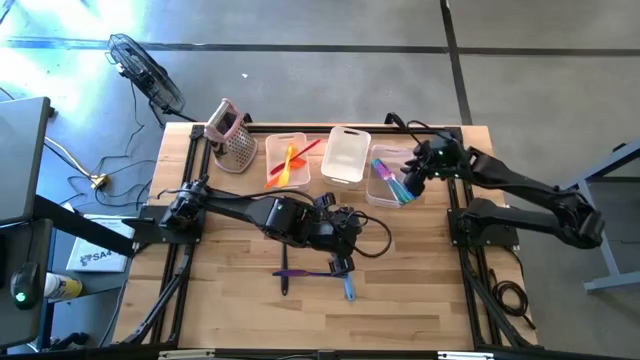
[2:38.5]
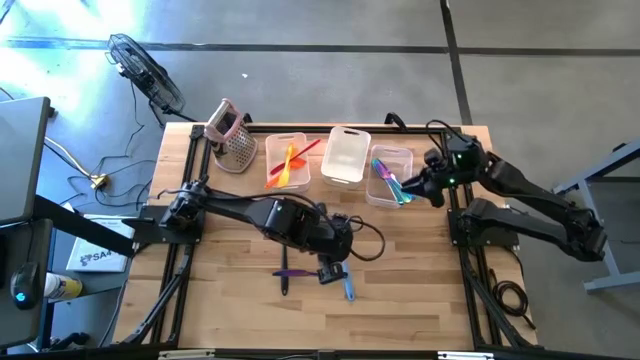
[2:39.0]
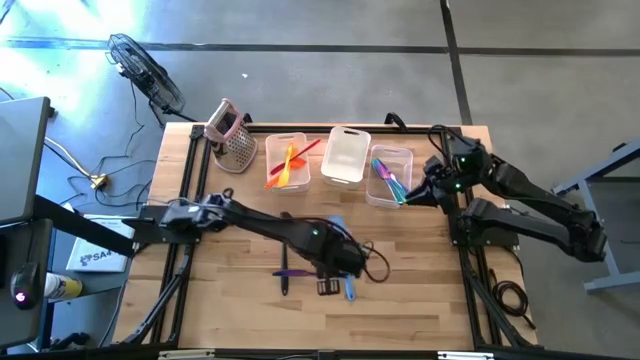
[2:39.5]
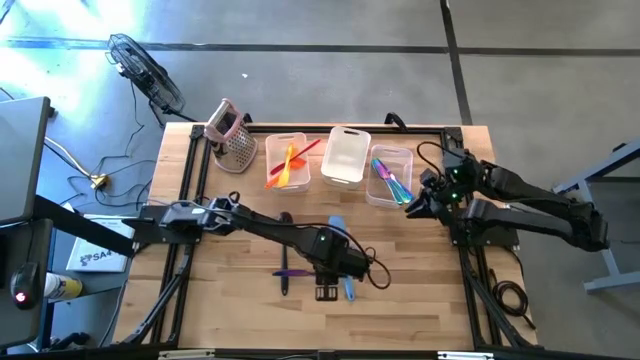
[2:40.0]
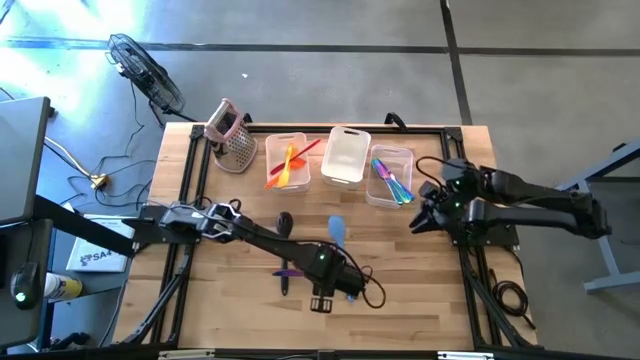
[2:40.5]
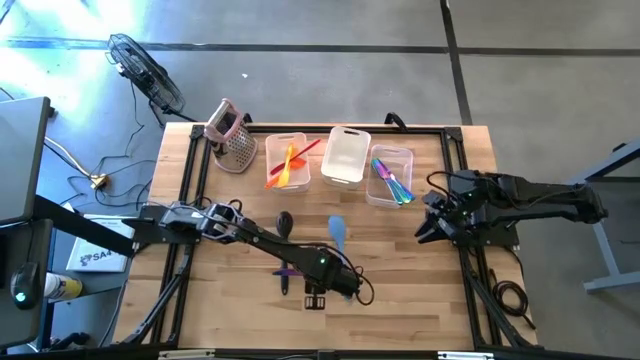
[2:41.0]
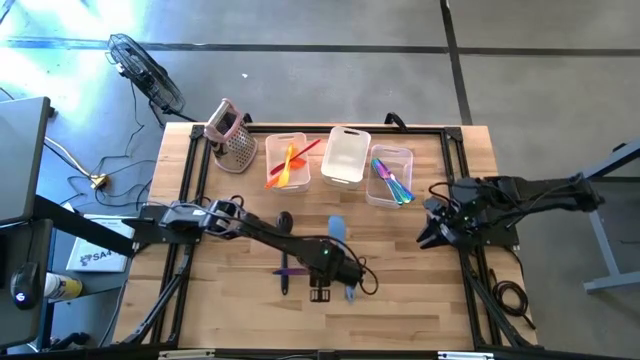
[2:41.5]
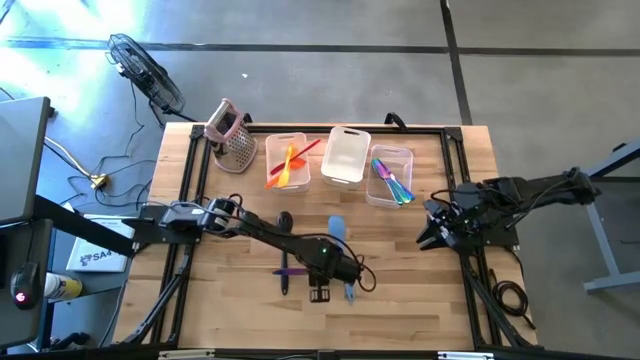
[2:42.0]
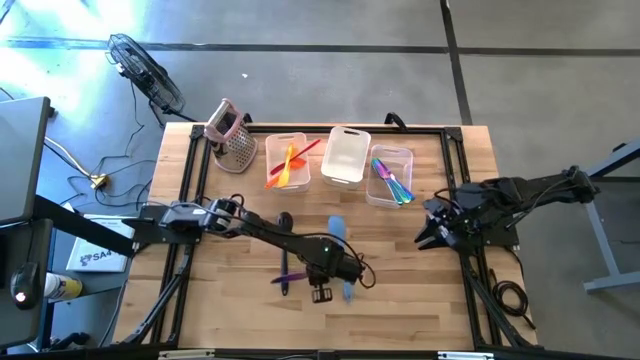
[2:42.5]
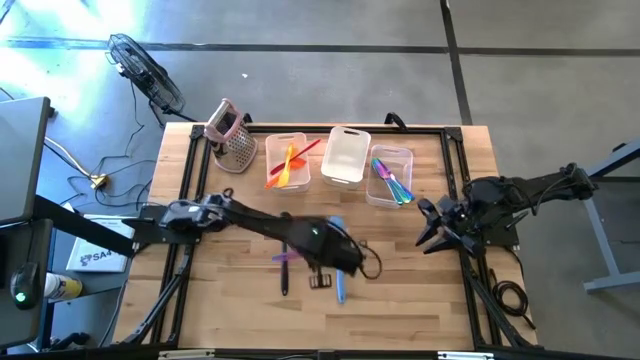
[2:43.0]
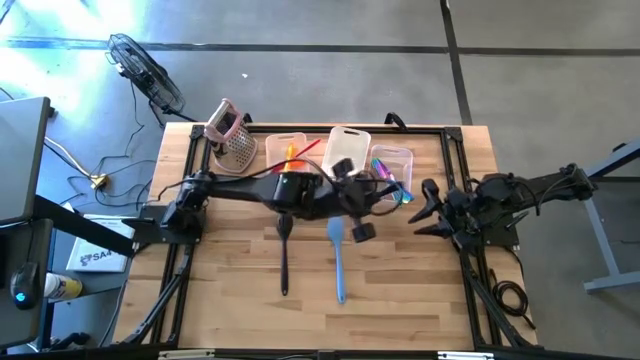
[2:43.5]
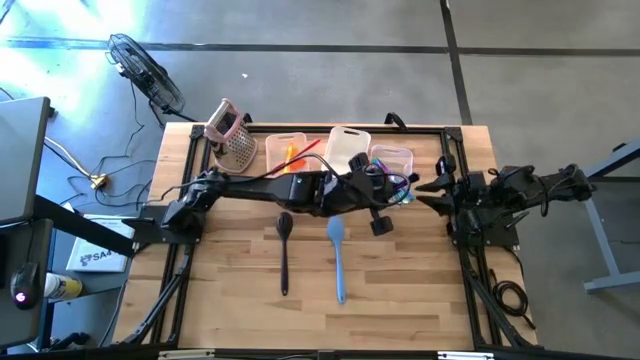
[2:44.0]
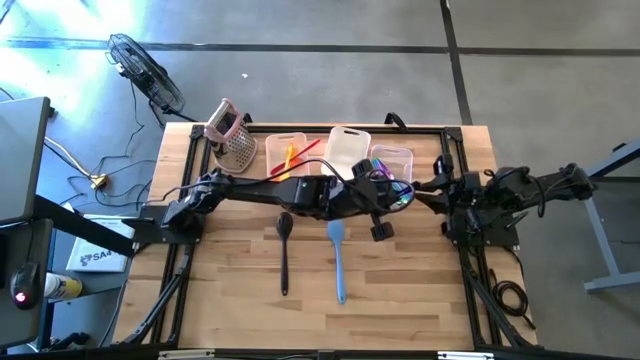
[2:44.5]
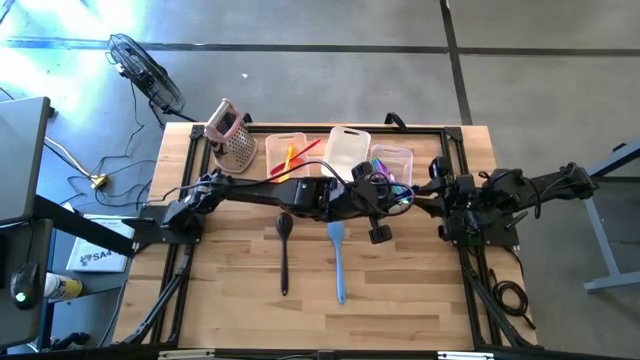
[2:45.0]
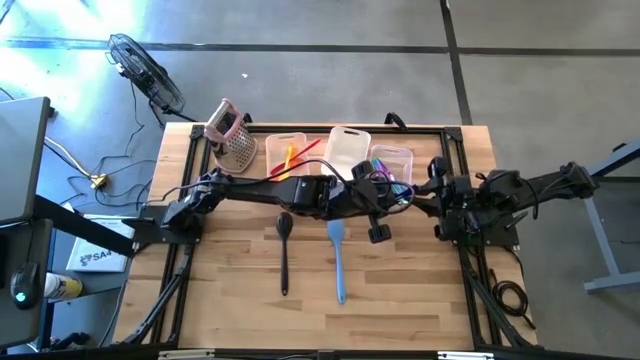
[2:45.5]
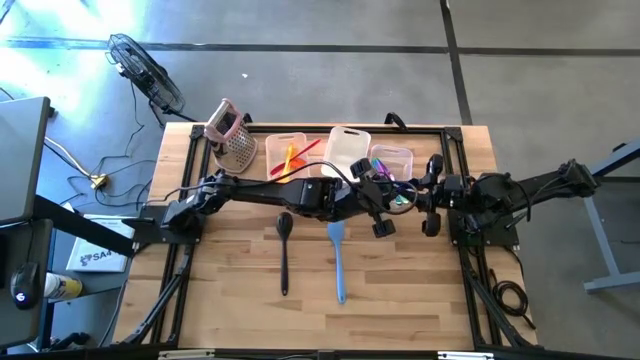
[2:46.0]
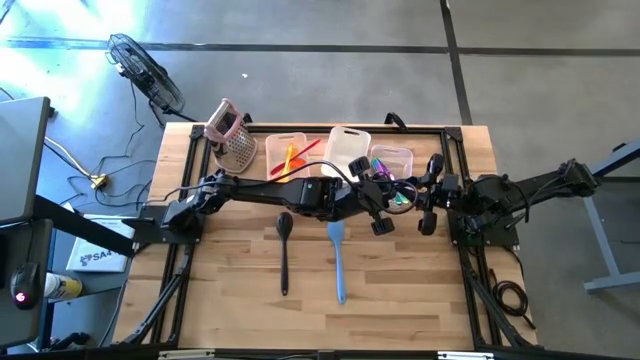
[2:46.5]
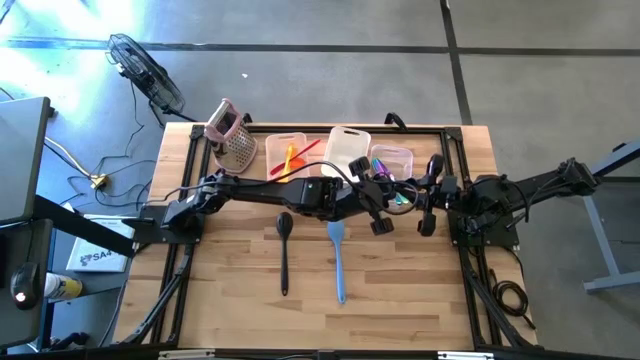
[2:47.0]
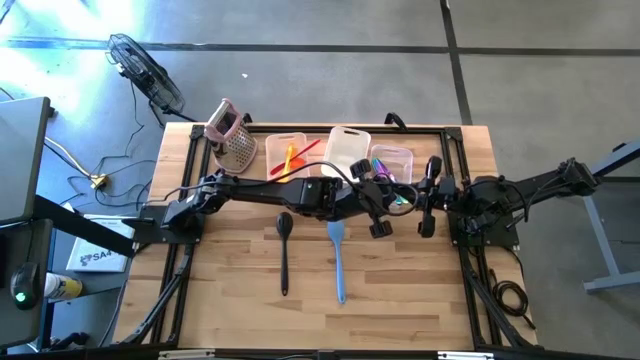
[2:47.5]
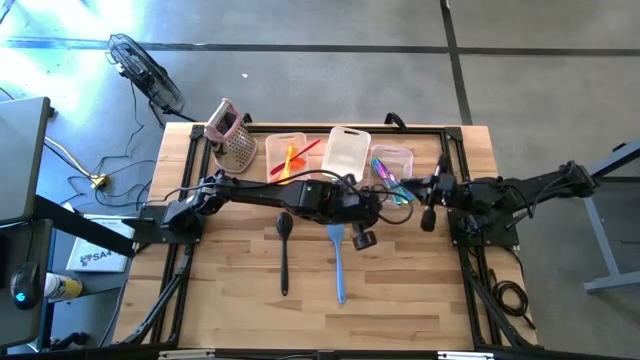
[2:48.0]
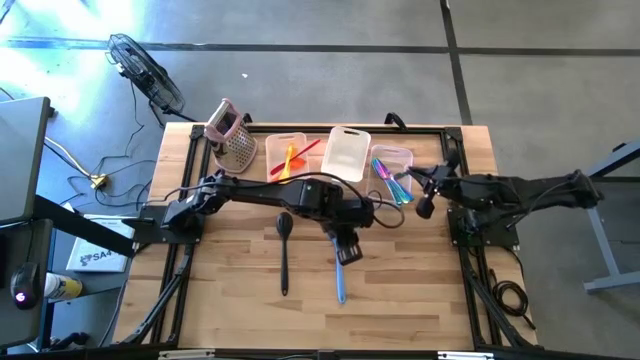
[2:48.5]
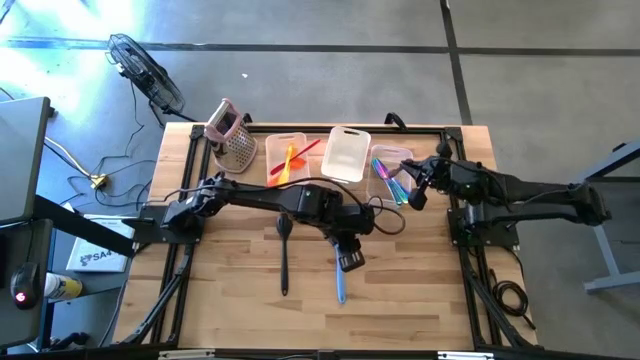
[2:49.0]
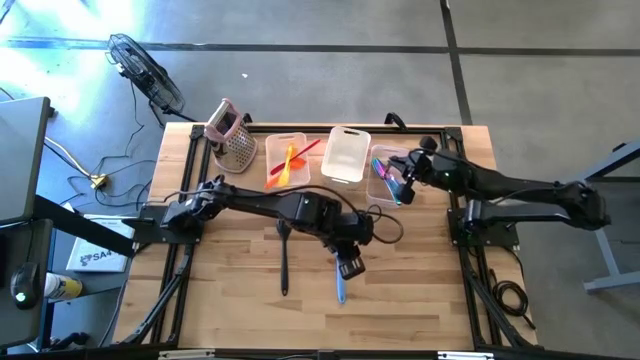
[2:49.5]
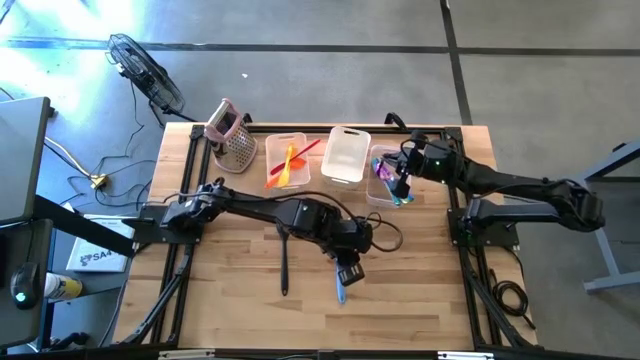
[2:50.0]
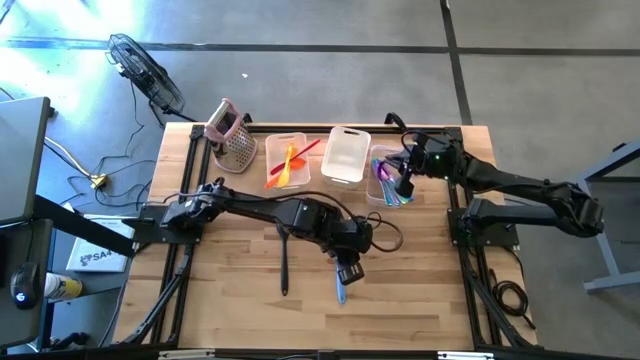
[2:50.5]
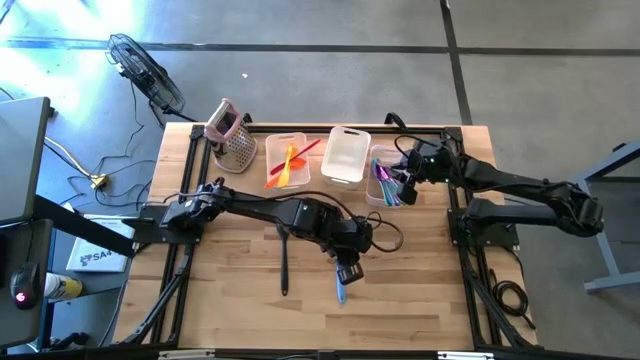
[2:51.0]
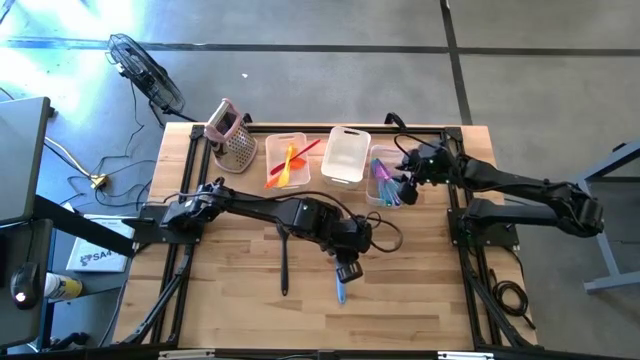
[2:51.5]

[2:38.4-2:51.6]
Task: Pick & Place Kitchen Items
Put the blue table knife into the transparent bin

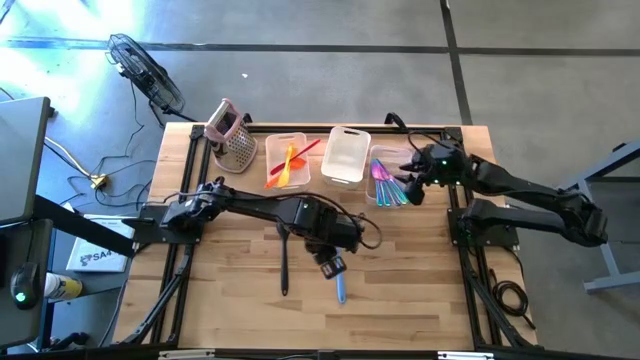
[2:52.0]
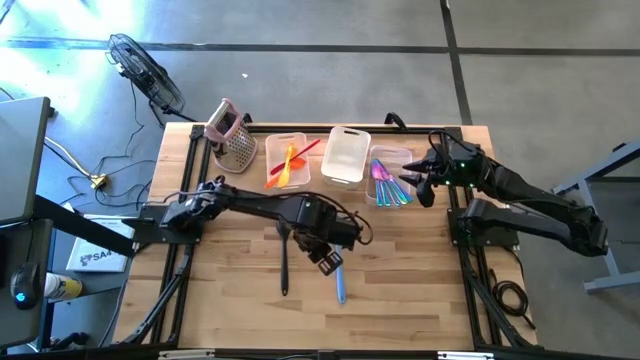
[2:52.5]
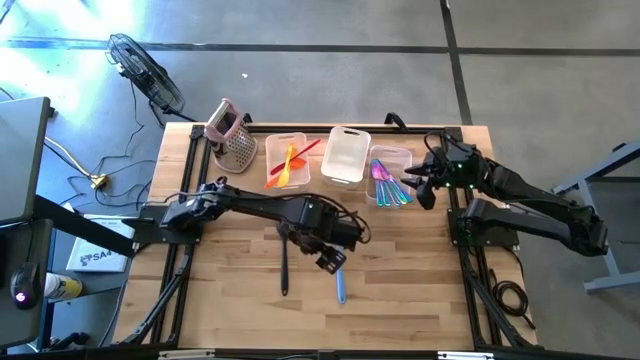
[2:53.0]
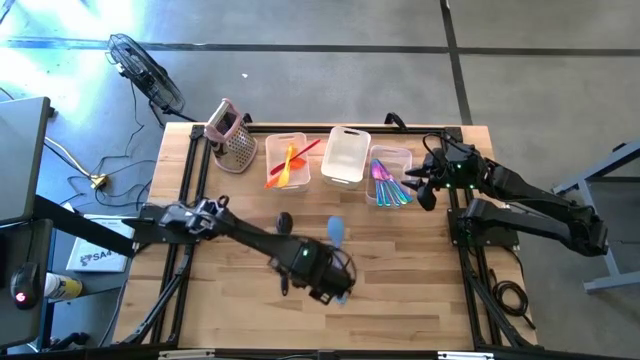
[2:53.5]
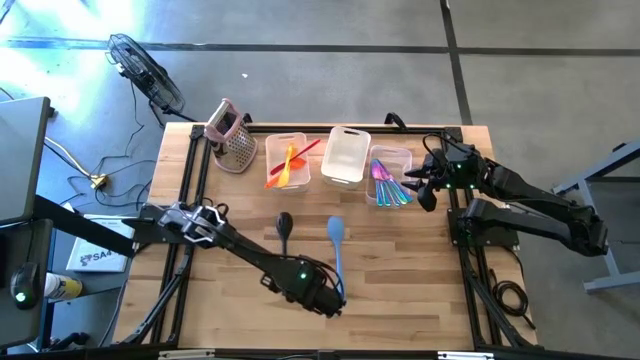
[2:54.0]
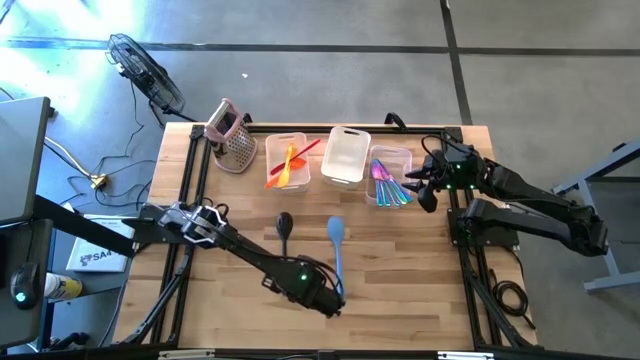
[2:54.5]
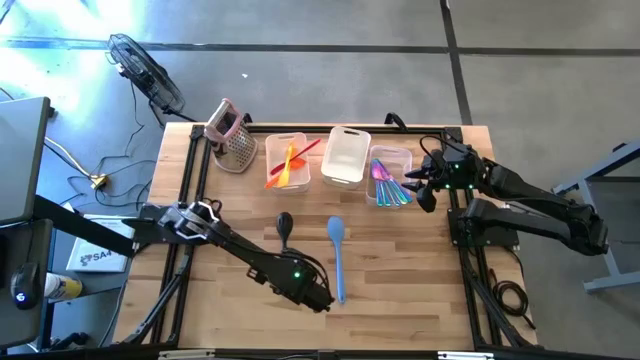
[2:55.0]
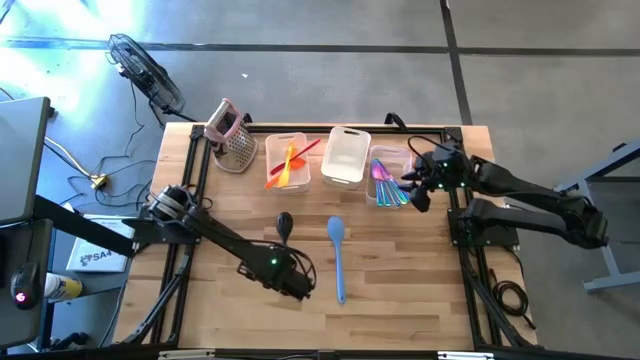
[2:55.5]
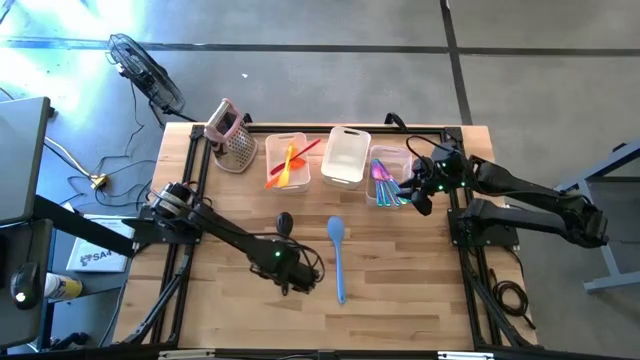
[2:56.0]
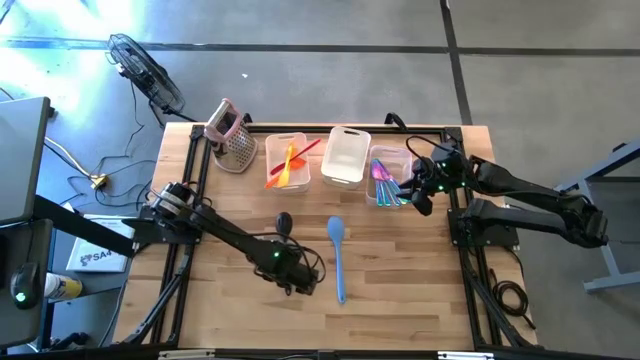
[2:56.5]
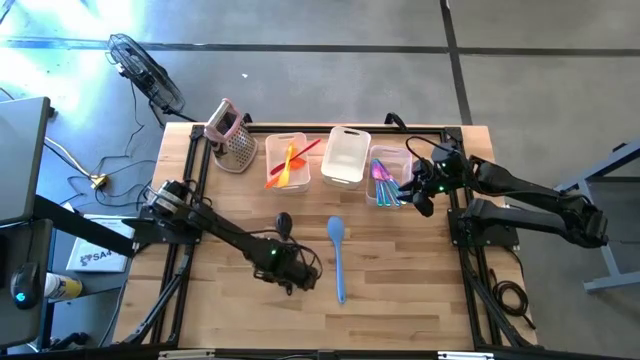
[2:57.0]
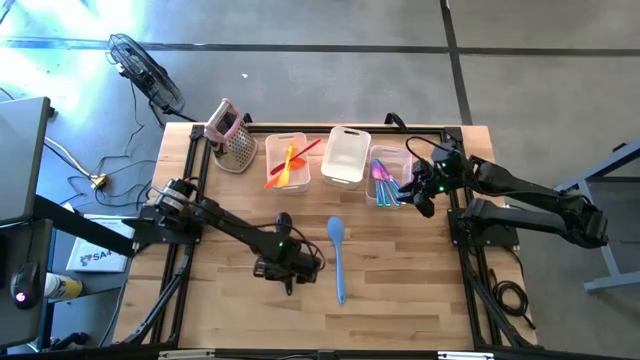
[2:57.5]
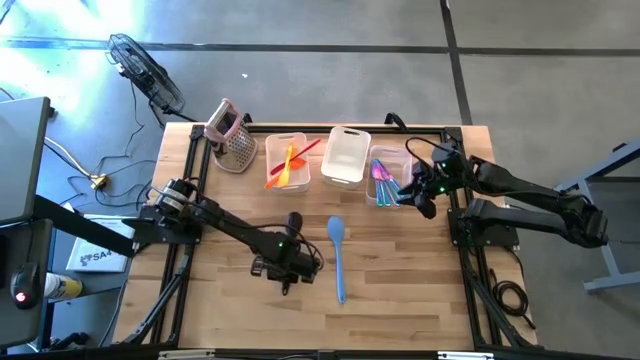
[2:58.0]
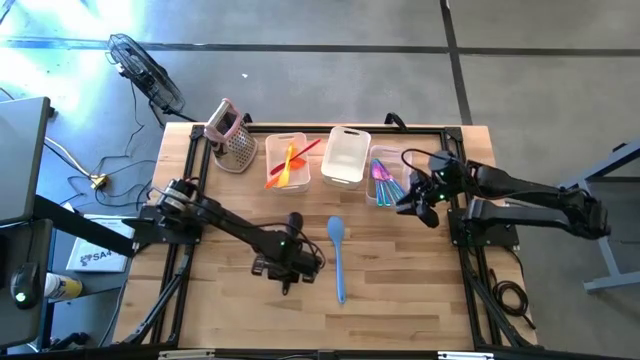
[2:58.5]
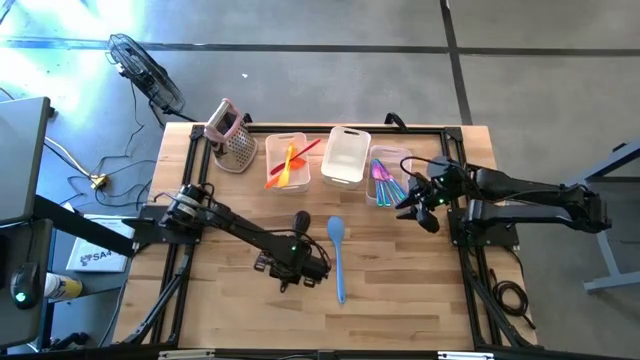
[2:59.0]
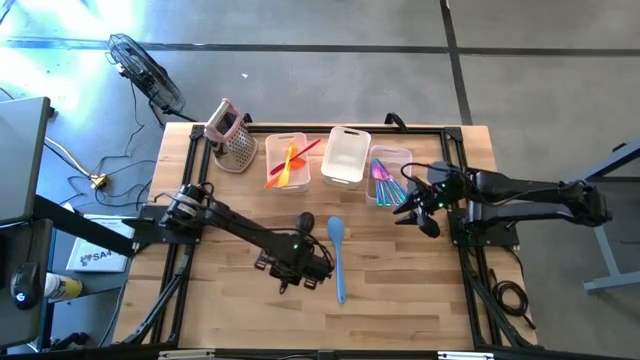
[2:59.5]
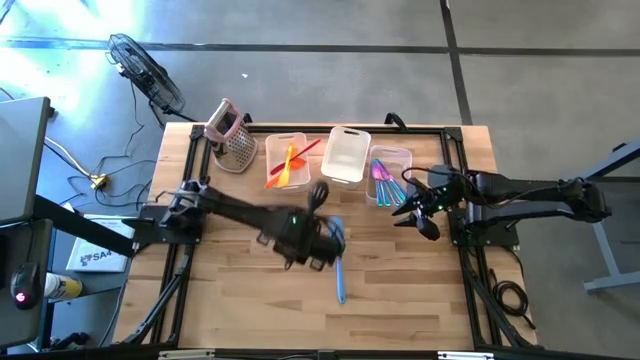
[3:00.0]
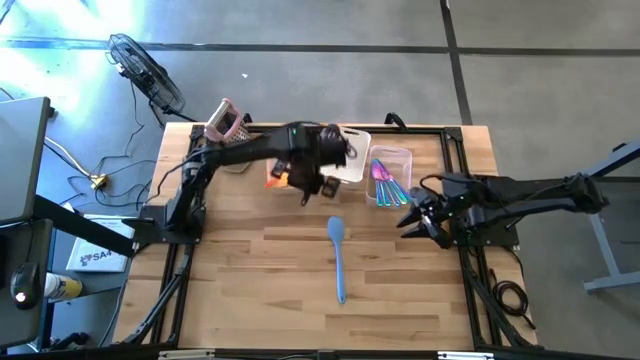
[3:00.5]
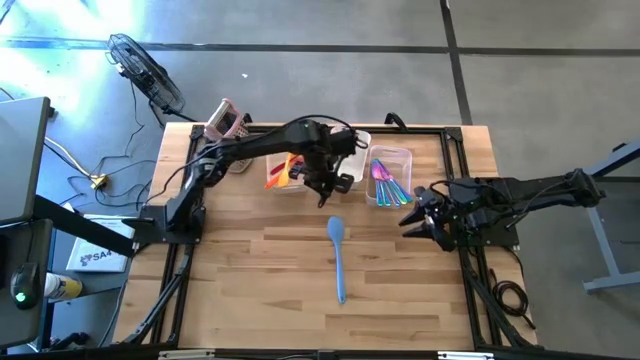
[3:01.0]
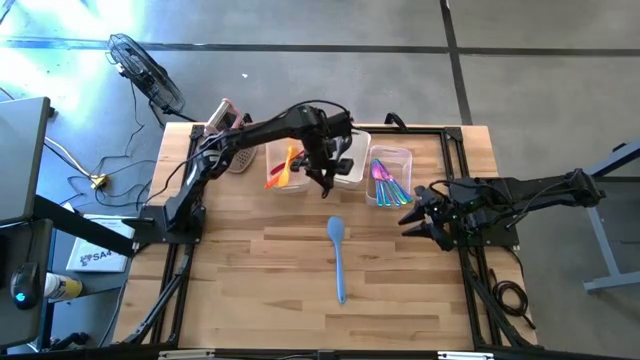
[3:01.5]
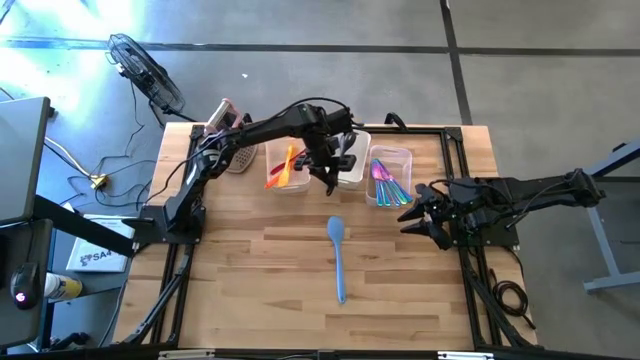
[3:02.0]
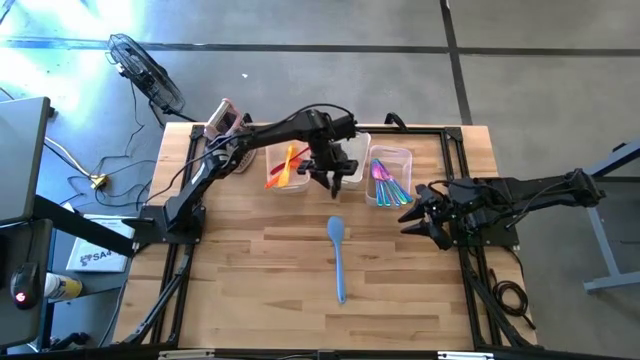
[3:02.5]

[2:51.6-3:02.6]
Put the black serving spoon into the right white bin
